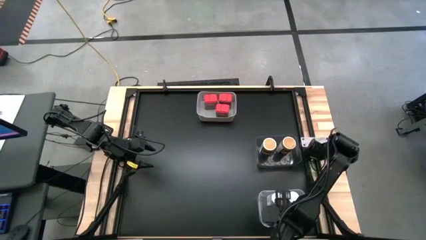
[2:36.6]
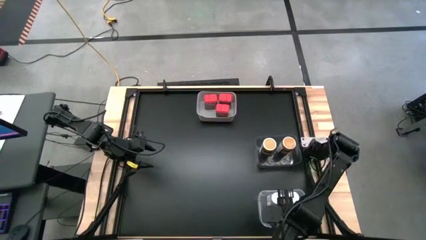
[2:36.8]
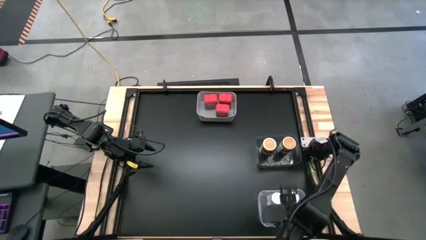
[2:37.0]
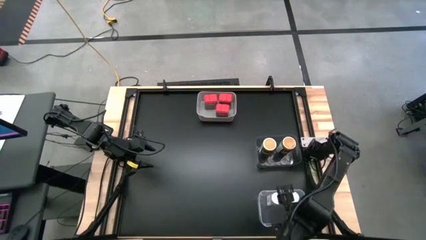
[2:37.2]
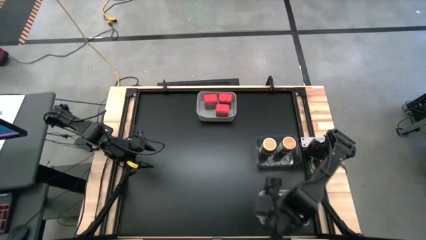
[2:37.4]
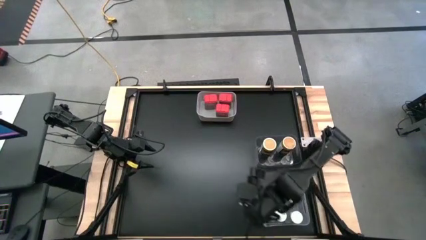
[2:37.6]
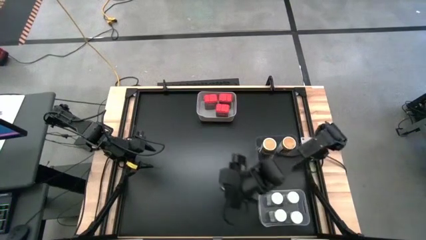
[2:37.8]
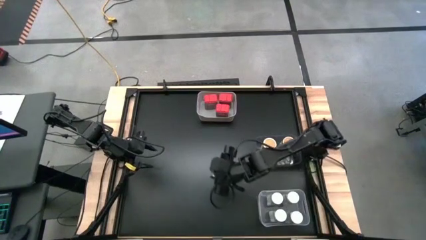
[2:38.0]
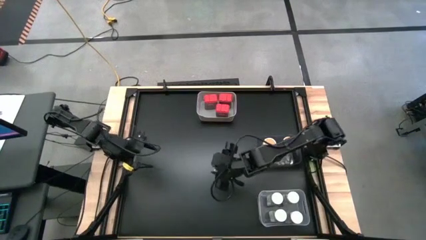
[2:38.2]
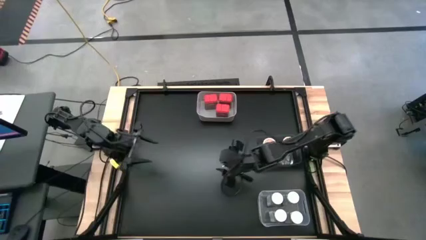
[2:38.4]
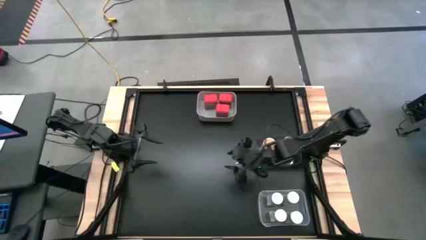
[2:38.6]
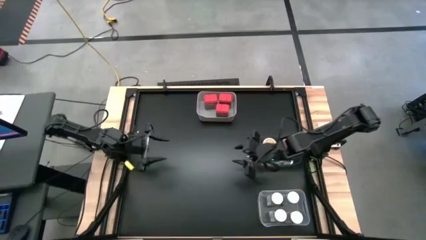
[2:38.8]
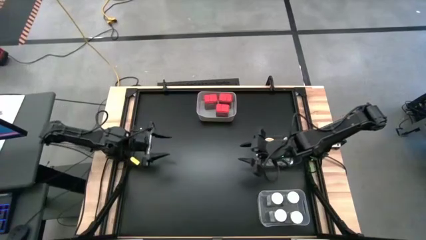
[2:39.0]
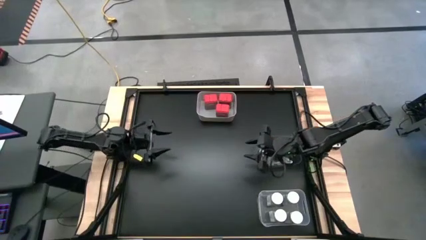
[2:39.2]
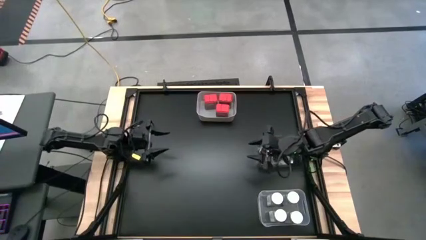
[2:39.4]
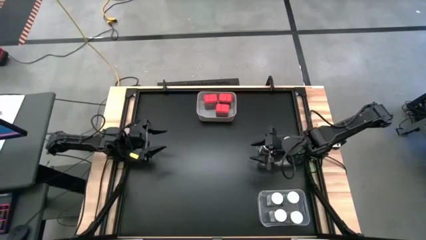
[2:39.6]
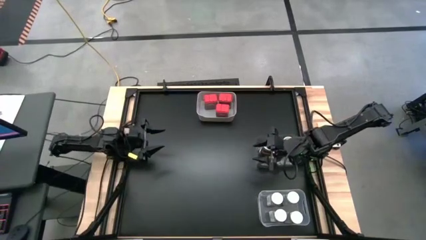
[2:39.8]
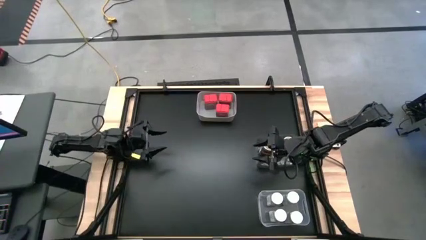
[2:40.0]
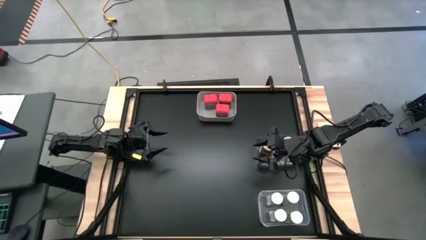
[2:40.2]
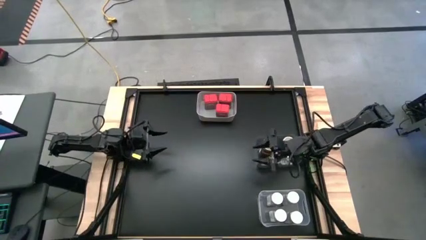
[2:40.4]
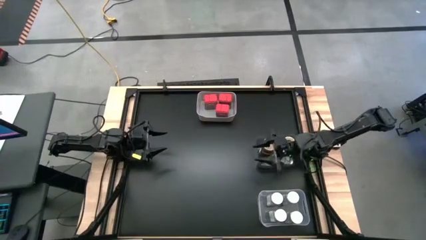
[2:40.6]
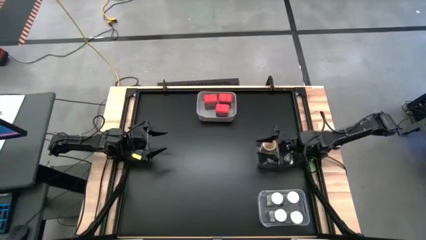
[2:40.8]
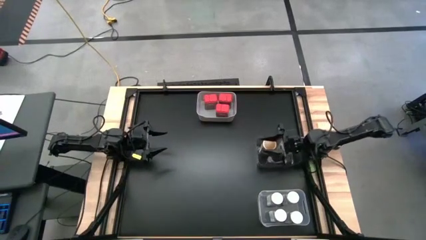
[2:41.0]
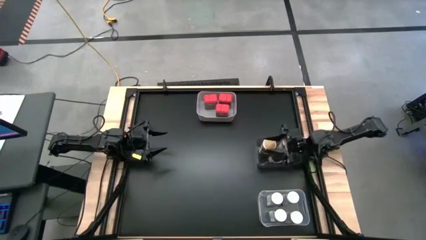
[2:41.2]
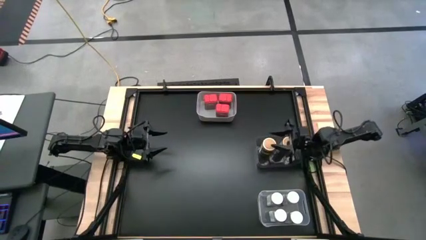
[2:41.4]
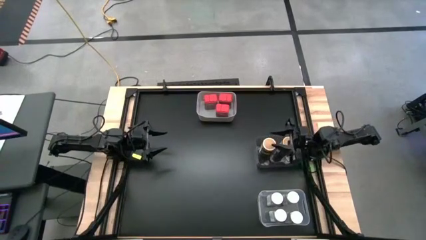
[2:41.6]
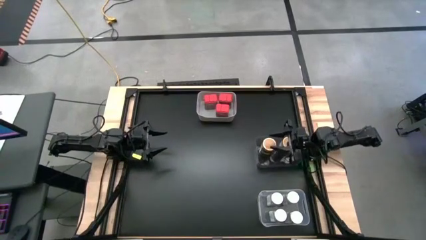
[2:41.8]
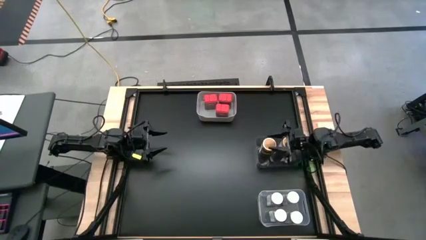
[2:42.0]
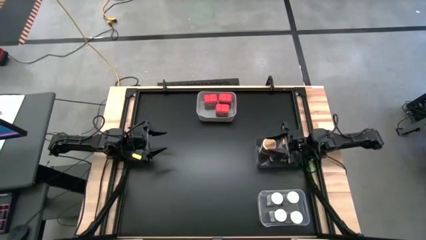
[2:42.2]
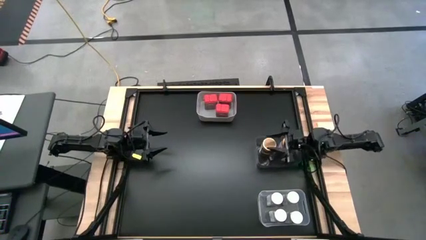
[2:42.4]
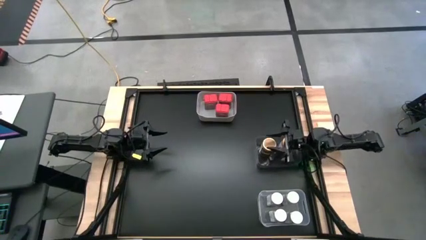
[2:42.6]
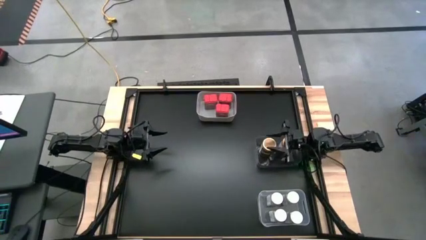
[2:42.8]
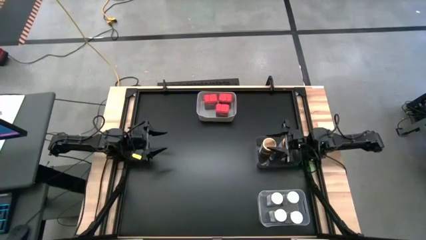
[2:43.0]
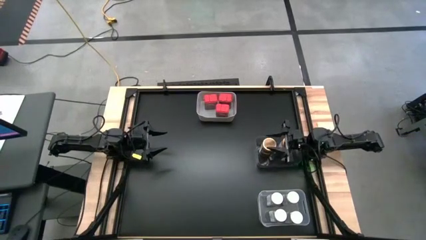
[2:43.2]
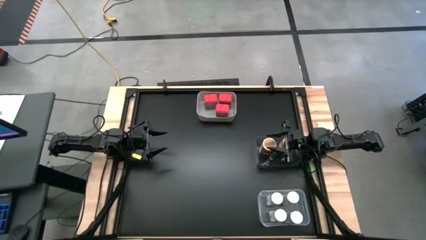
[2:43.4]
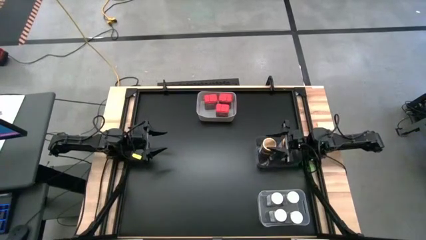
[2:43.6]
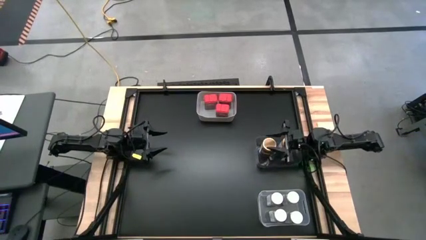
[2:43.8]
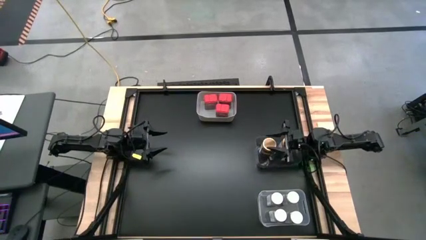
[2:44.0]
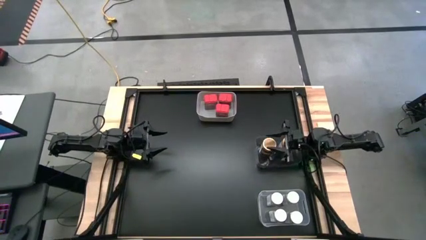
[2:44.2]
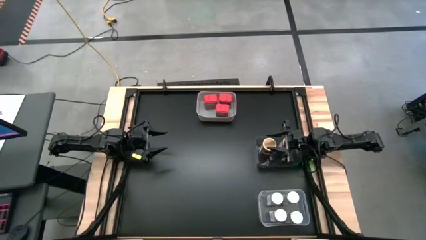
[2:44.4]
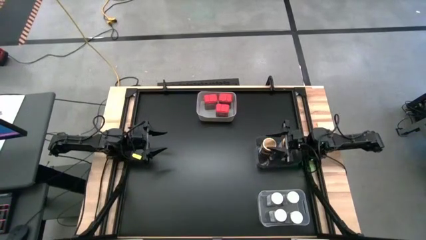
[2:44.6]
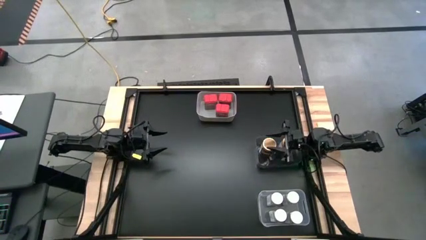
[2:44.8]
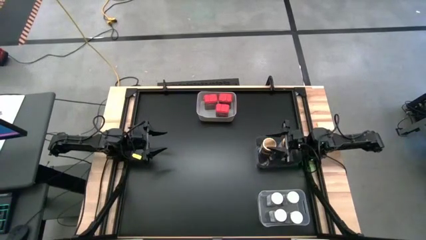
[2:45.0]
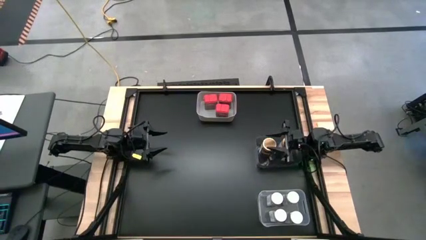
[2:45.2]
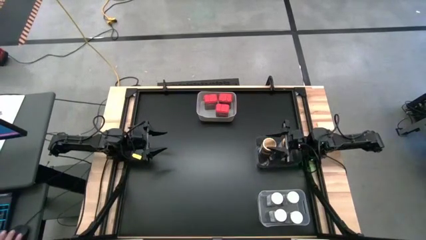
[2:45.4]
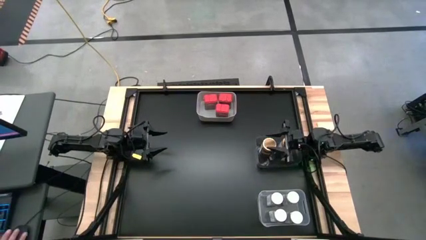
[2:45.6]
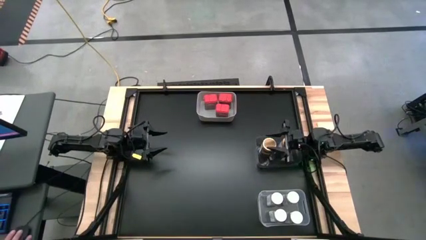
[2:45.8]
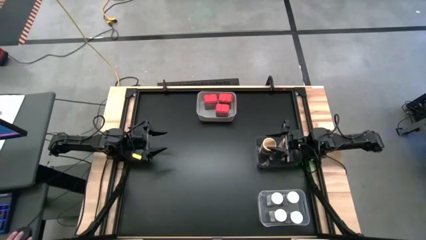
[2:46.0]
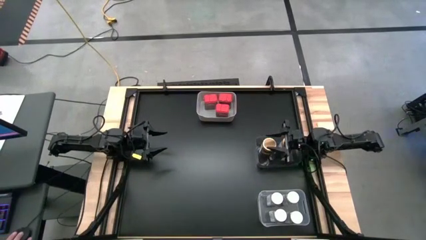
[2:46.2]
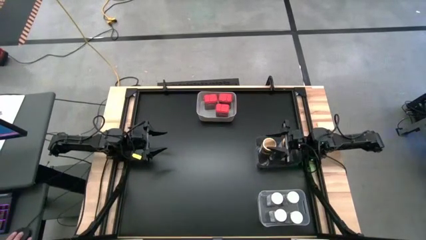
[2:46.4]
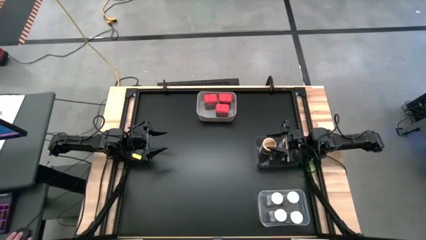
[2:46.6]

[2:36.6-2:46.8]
Task: Sort spices by type
Return to Home Position

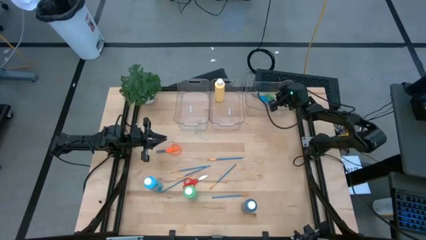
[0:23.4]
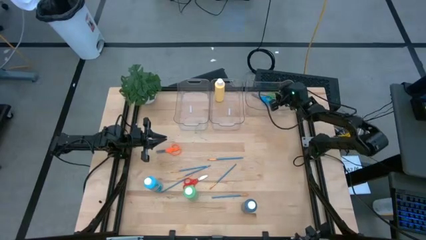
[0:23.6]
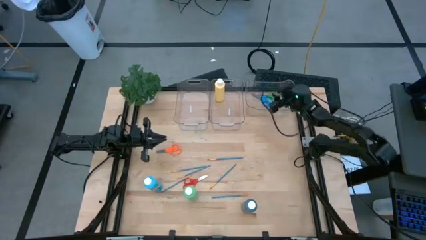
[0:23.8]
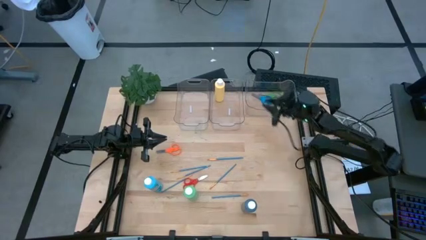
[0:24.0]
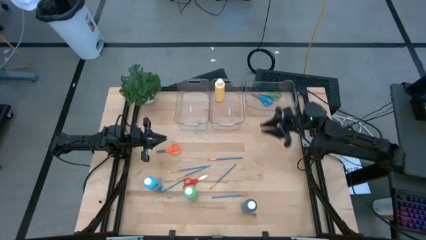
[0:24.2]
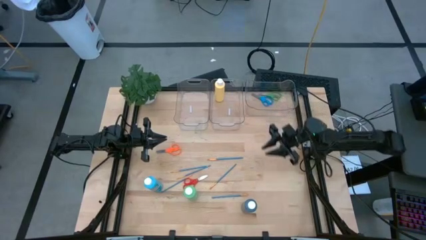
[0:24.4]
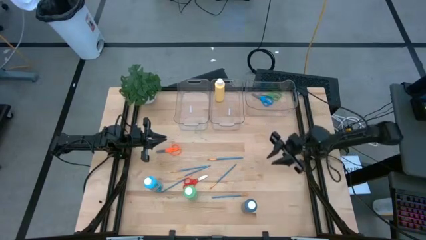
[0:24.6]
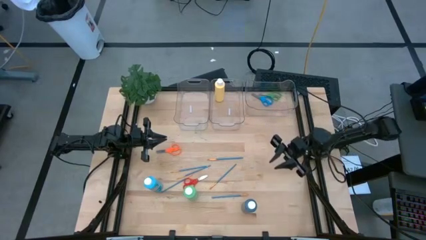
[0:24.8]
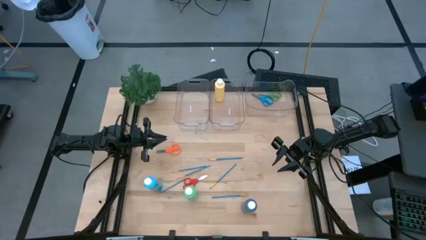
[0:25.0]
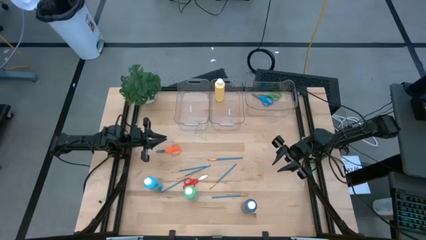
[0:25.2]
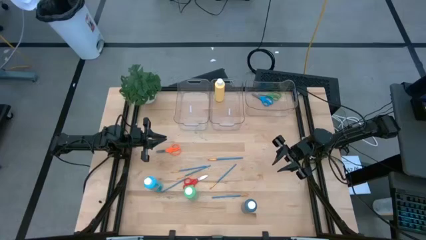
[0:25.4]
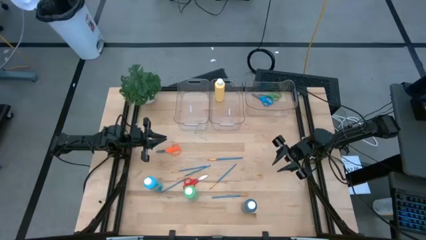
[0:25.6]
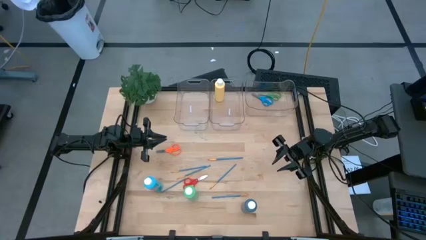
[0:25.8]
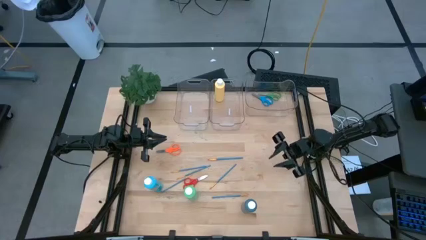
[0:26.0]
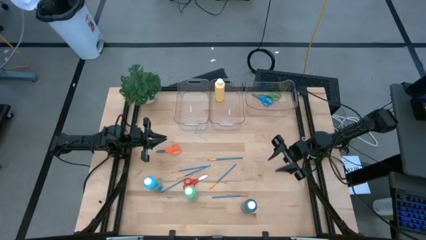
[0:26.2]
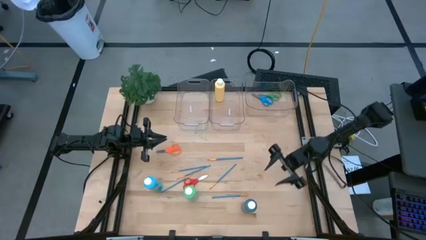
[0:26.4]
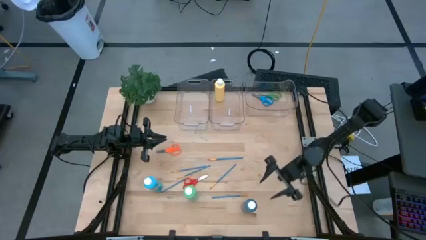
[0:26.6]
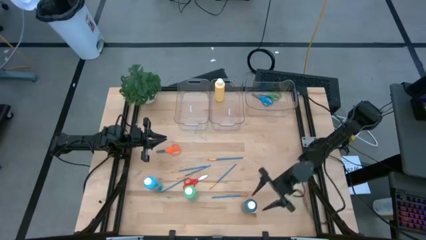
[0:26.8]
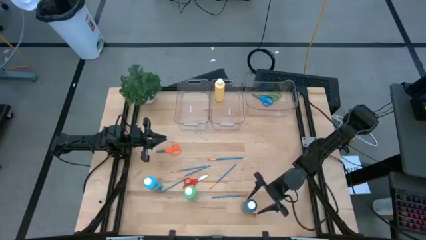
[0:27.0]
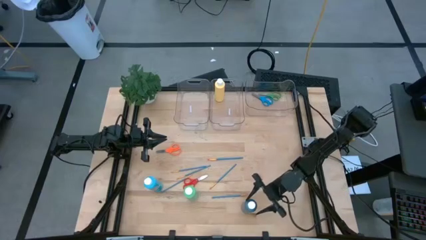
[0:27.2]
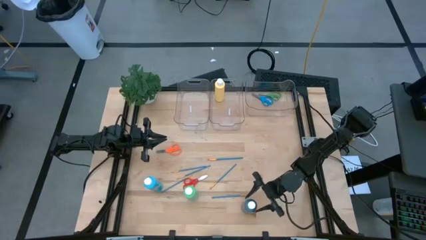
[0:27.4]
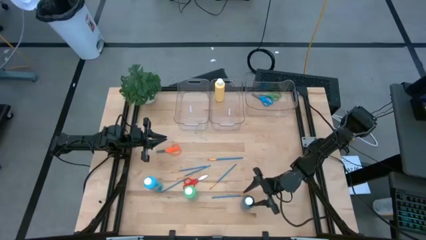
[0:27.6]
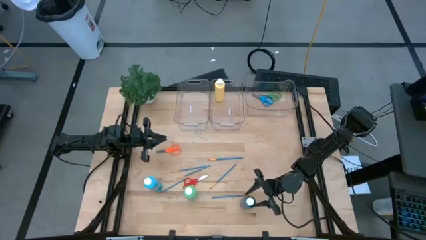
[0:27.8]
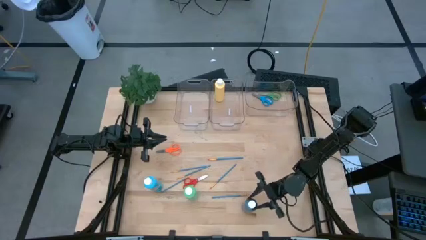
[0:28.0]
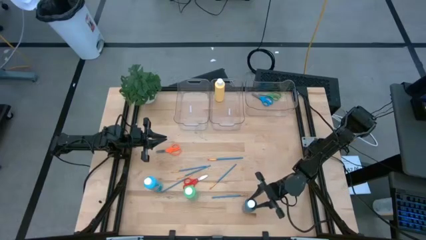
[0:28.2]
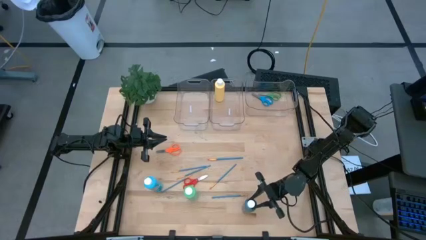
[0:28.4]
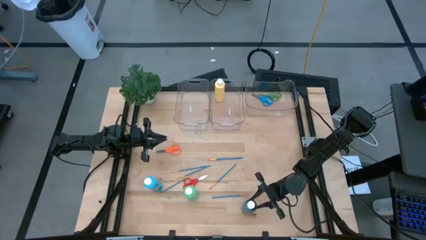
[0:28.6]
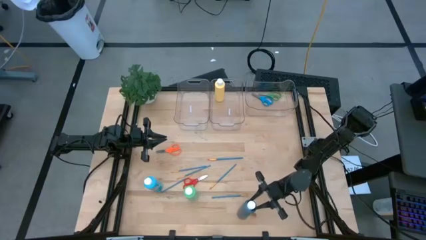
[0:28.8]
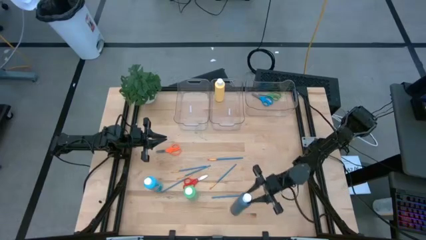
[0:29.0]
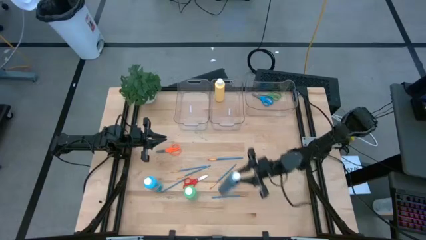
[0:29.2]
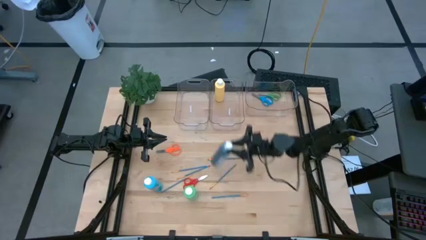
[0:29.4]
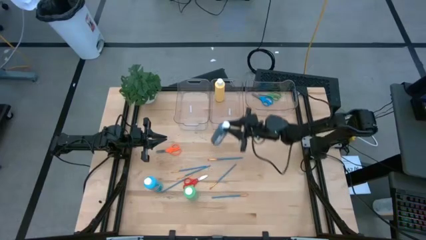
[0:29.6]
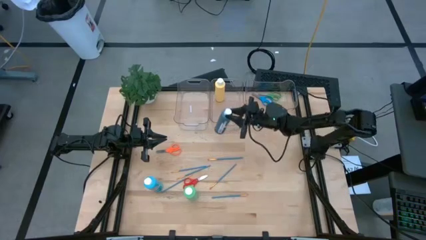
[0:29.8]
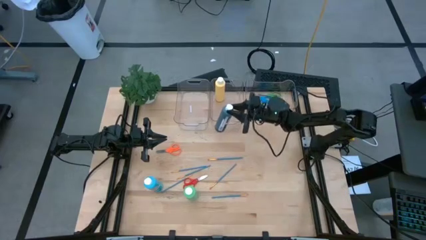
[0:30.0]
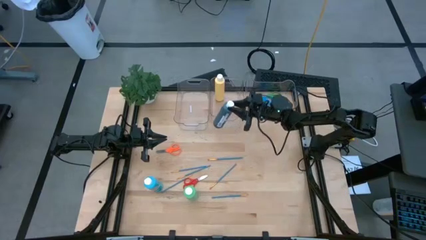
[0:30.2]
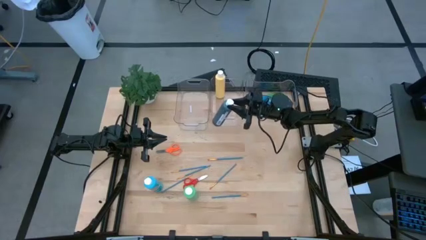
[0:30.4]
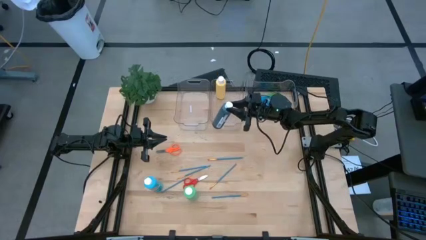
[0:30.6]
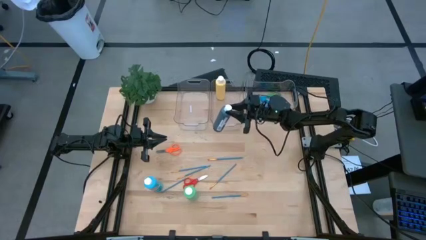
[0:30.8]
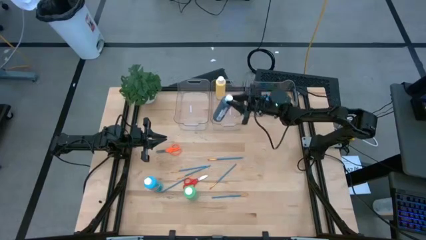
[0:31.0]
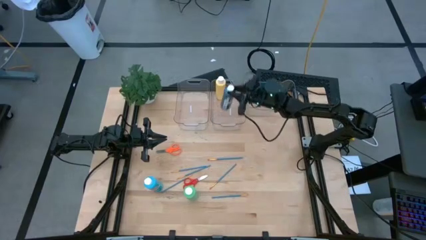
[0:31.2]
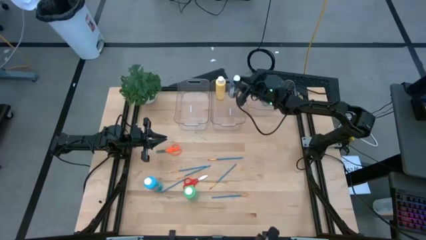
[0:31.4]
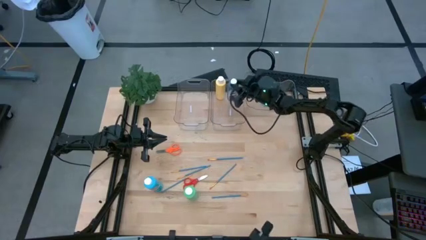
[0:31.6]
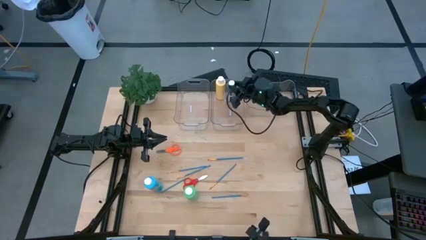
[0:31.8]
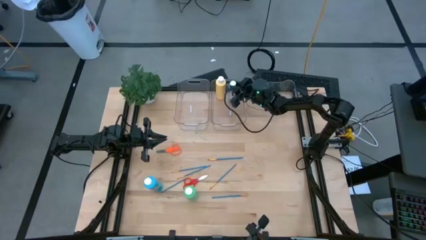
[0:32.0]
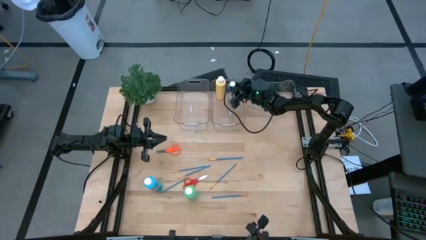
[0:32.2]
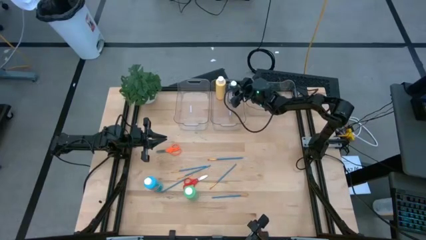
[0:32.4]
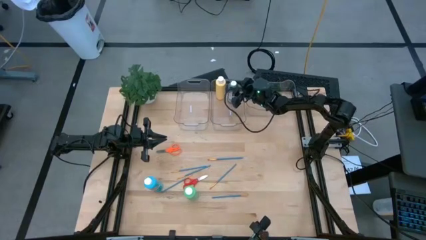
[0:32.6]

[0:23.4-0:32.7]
Task: Pick & Place Paint Supplies
Put the black paint bottle into the middle transparent bin
